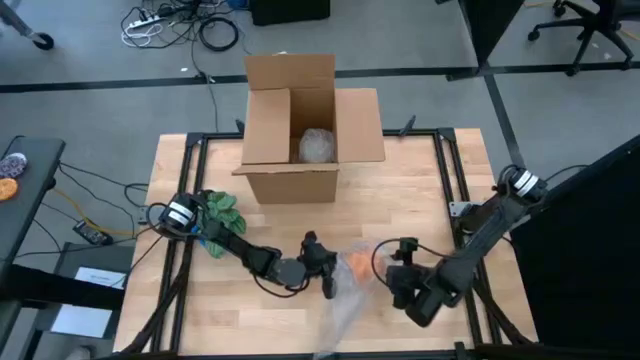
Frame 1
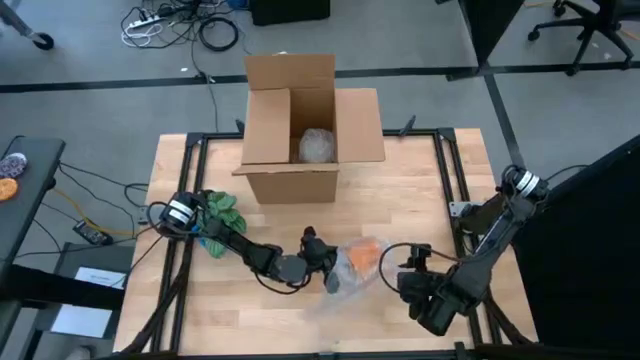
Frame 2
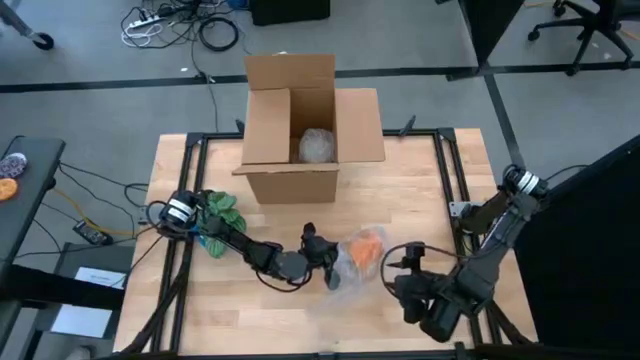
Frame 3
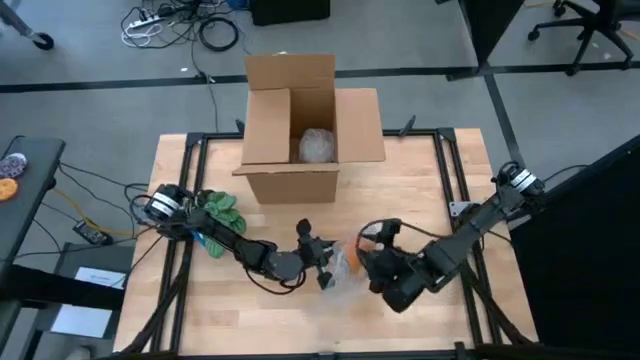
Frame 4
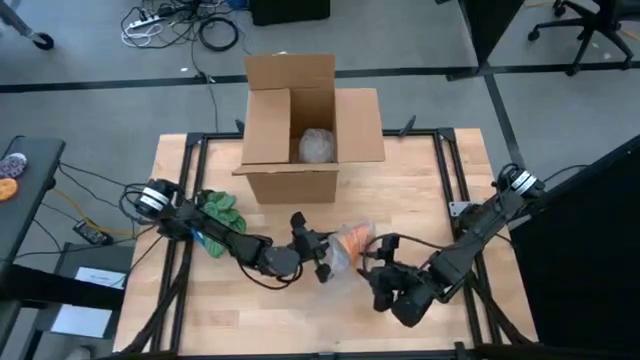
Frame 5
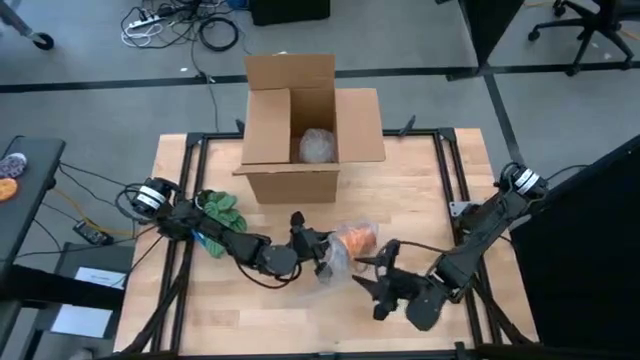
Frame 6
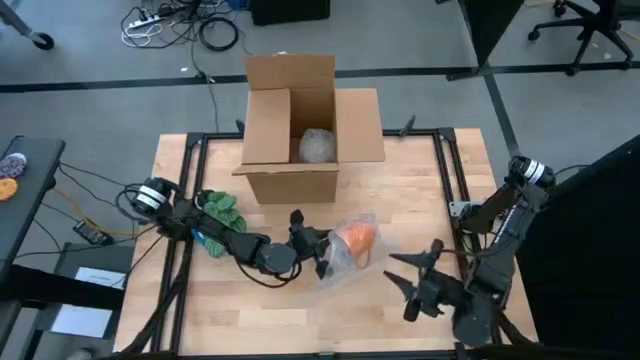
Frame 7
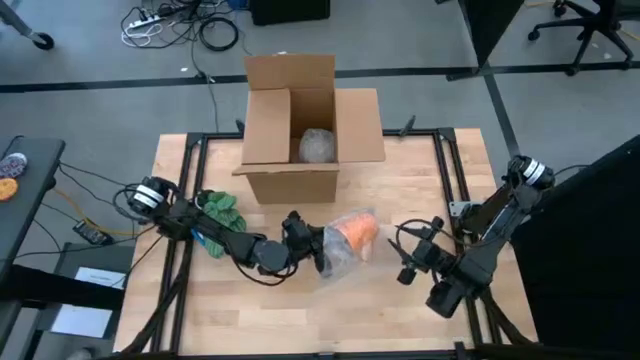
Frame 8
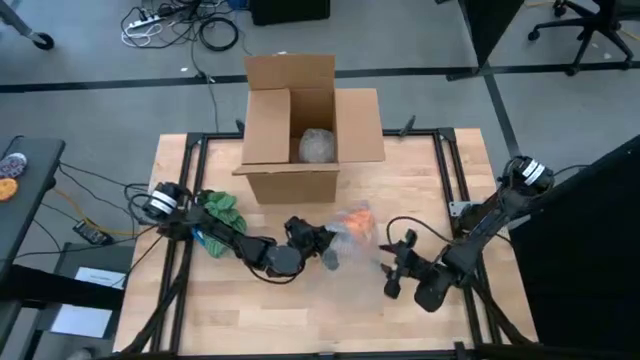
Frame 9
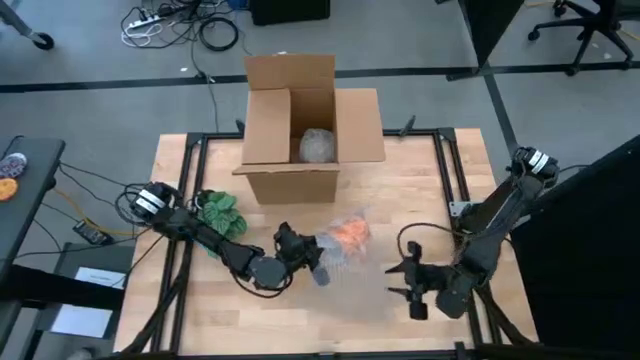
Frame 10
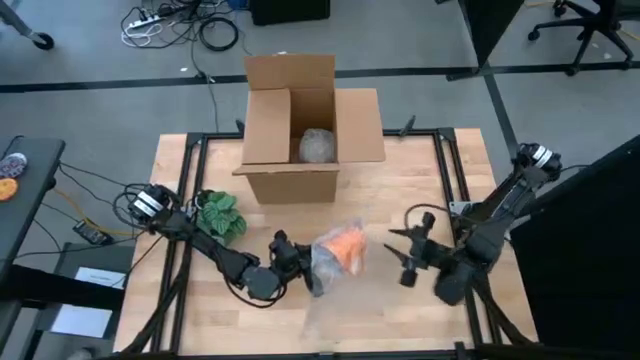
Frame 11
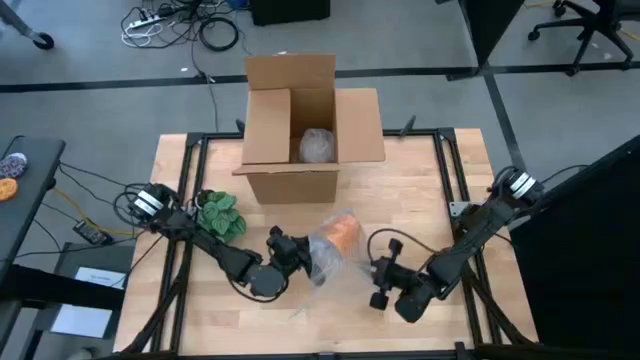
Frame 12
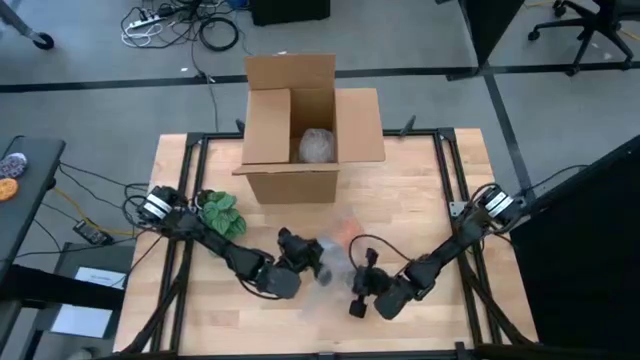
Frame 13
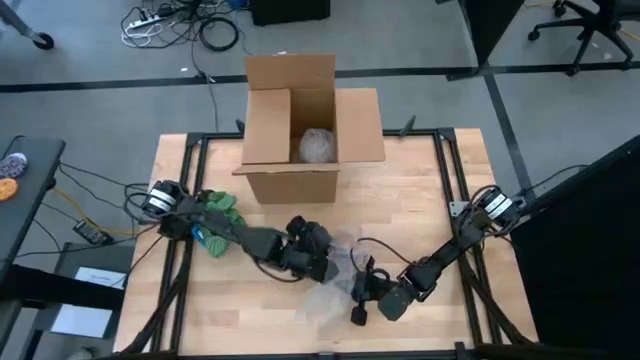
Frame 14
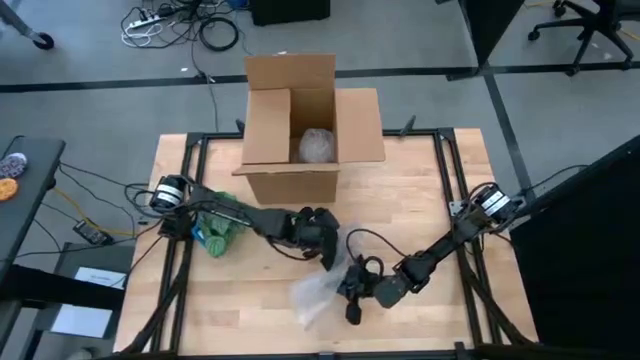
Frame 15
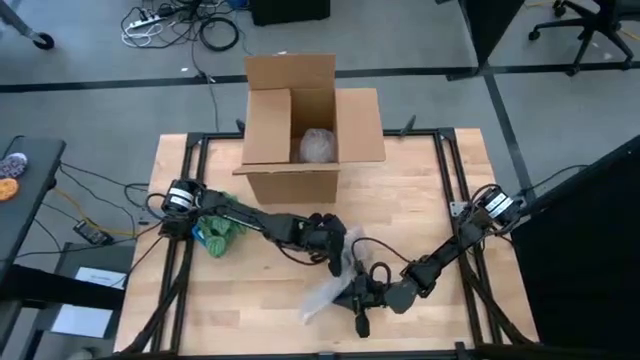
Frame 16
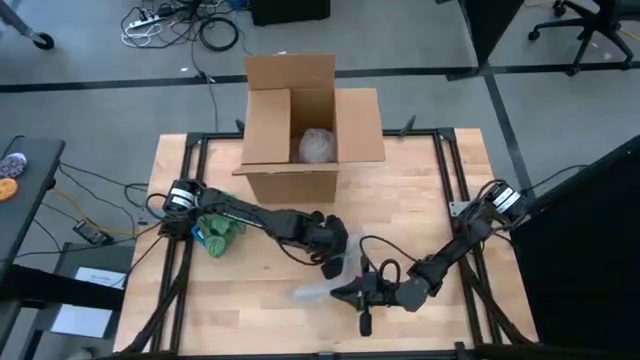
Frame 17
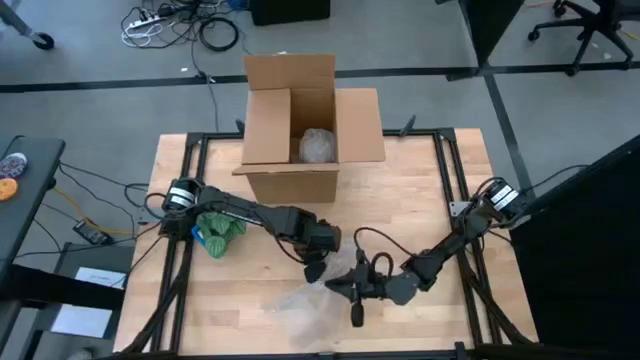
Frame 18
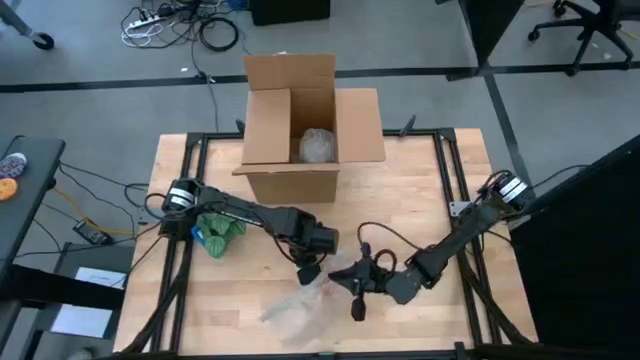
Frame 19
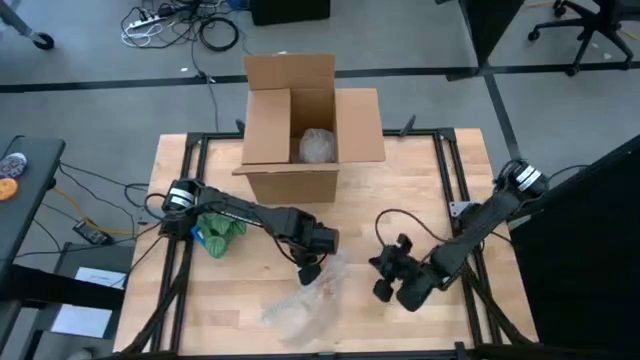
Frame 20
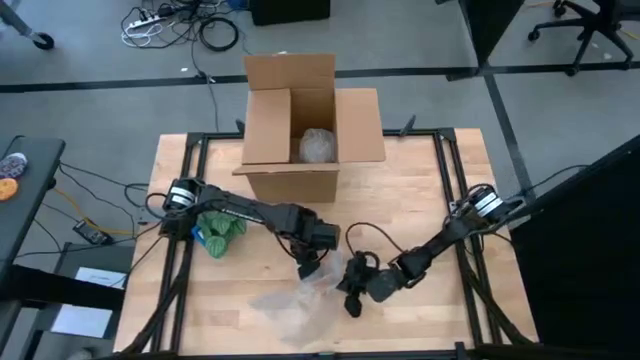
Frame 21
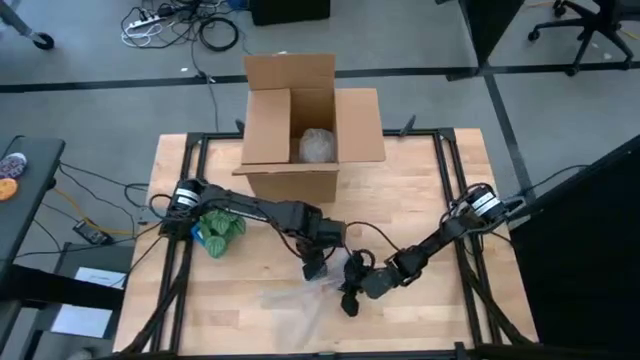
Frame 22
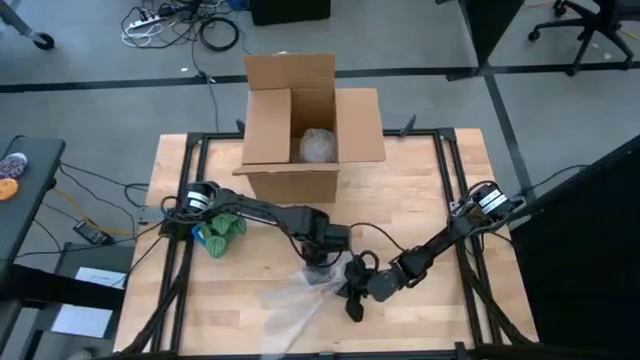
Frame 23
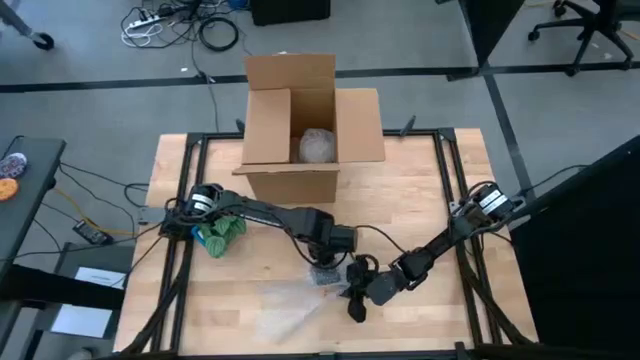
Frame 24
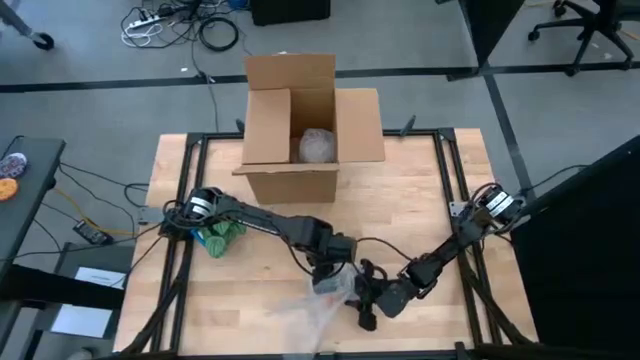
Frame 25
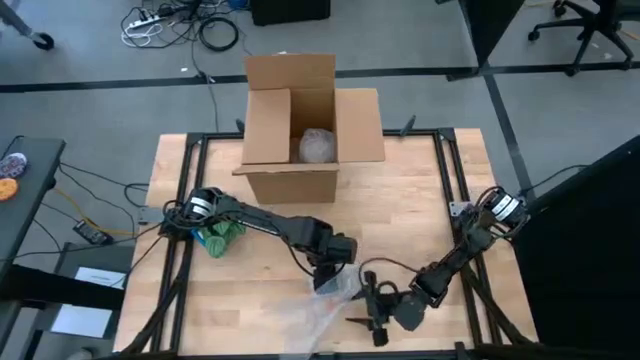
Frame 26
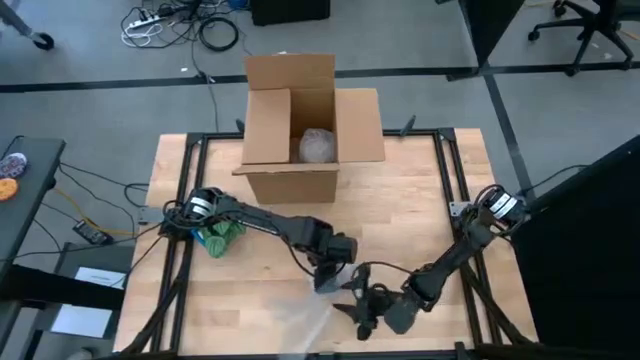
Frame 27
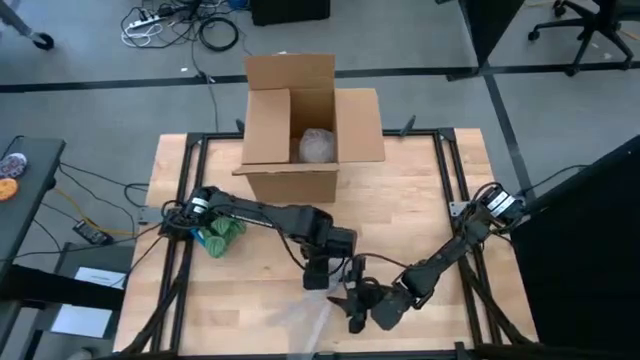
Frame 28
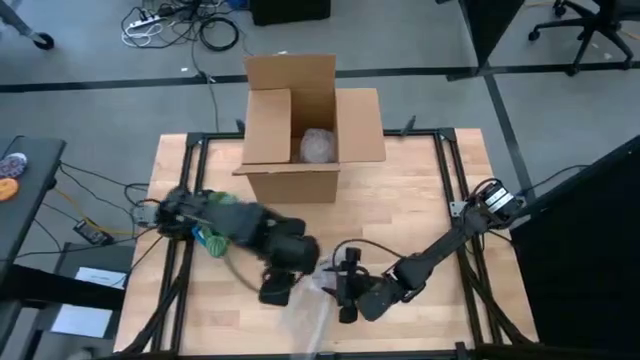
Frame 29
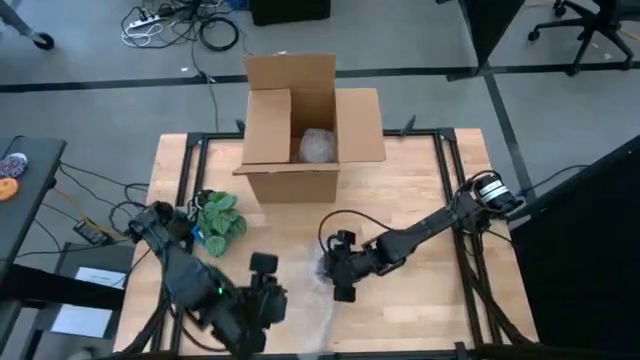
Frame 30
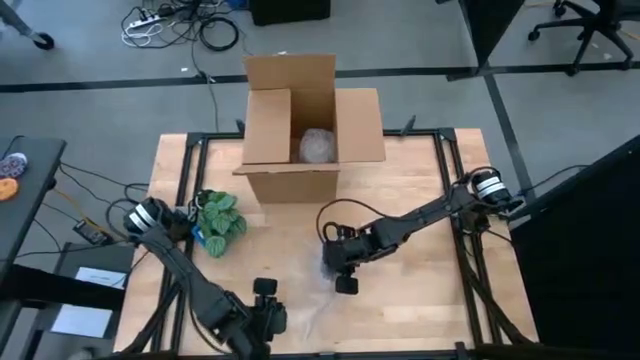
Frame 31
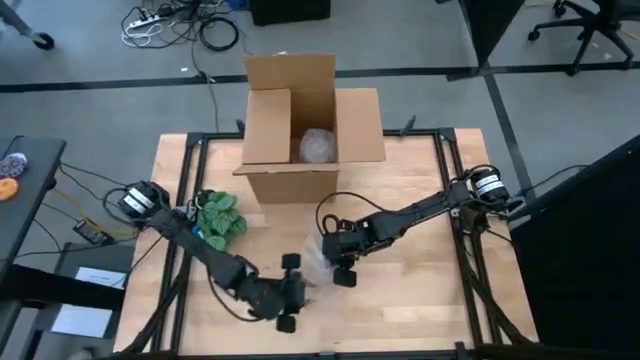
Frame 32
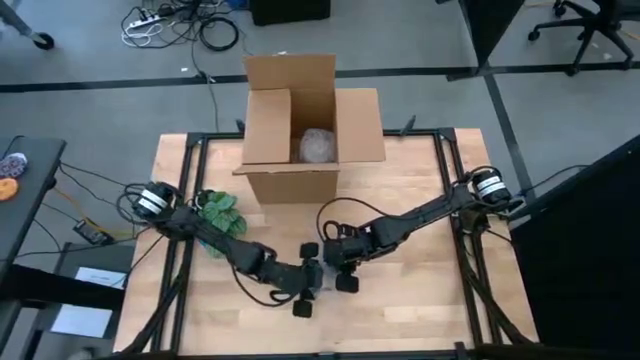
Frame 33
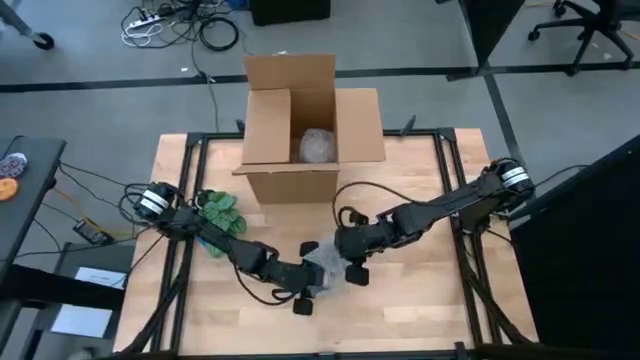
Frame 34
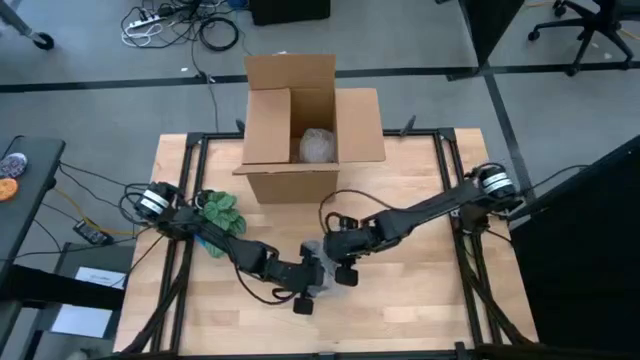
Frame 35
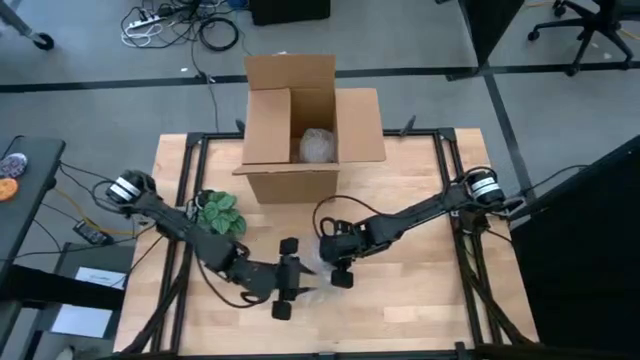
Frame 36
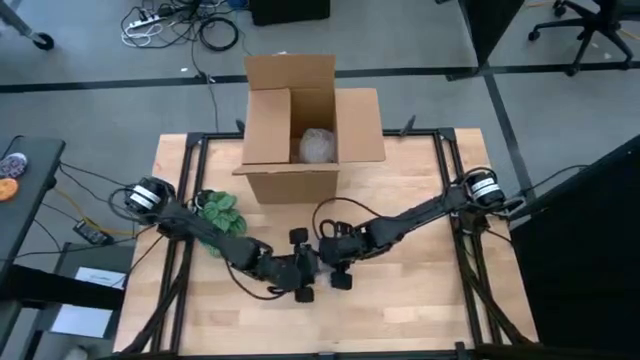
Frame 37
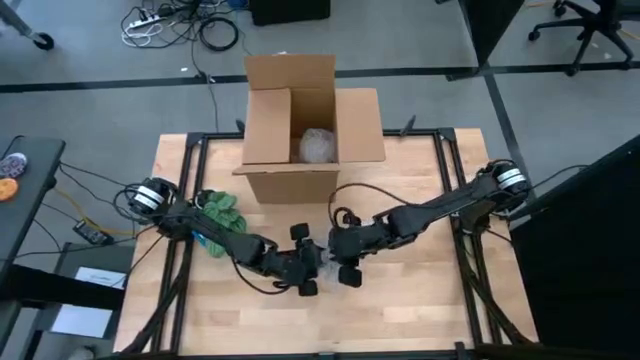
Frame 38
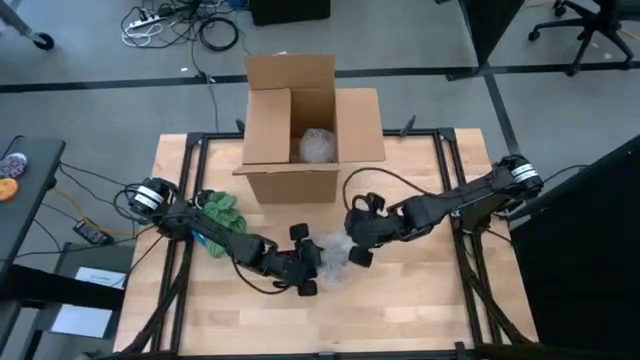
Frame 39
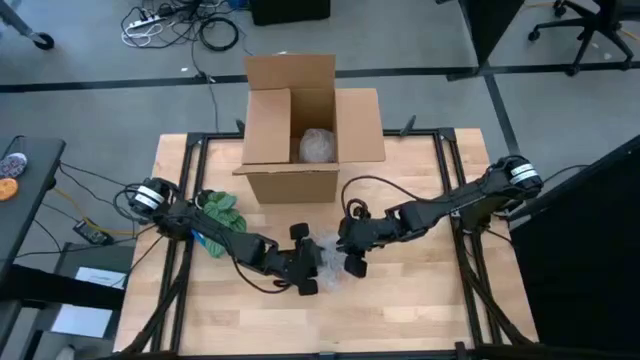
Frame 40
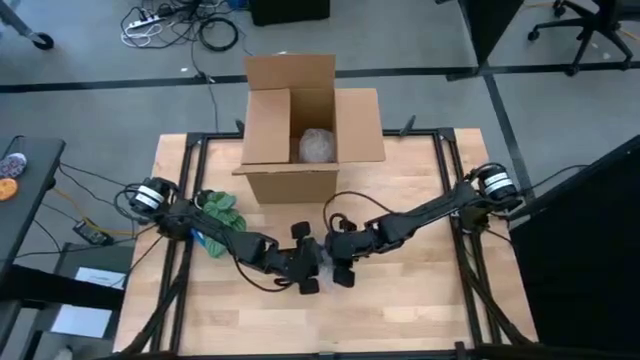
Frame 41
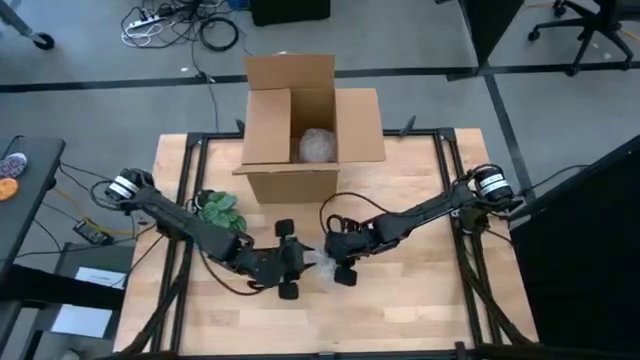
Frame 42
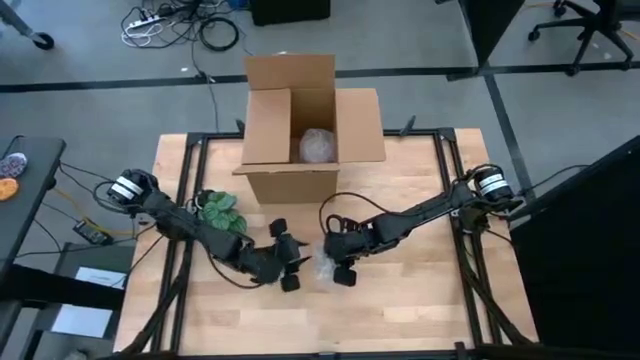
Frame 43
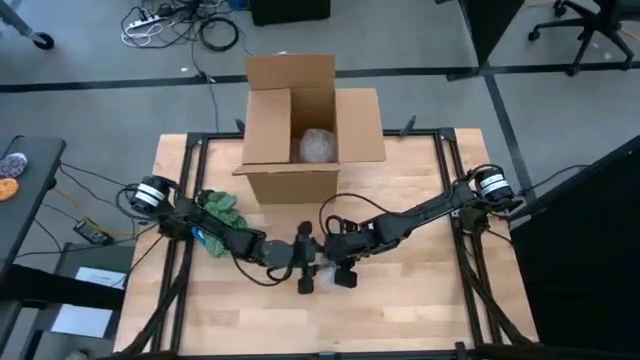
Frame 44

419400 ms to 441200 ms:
Task: wrap mug
Wrap the orange mug with the bubble wrap
